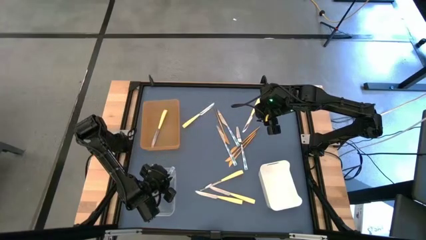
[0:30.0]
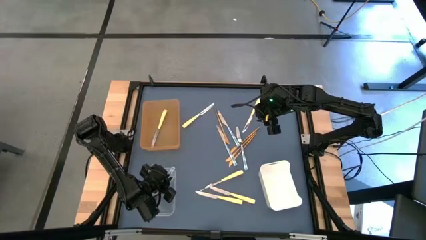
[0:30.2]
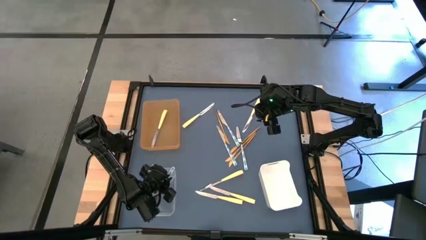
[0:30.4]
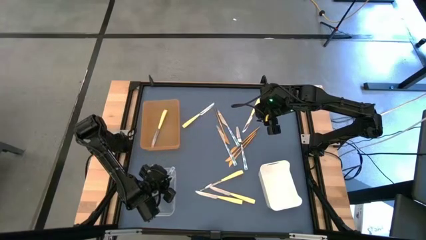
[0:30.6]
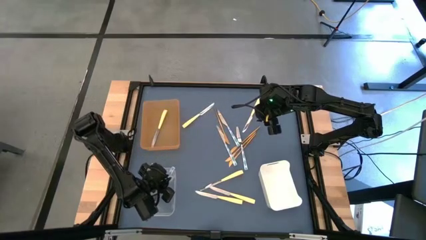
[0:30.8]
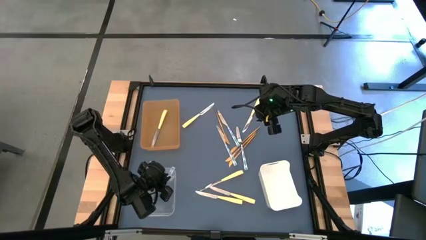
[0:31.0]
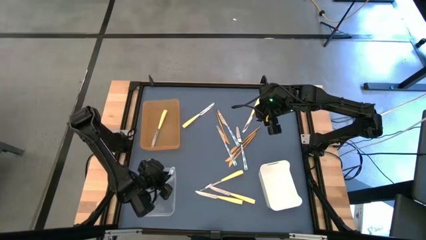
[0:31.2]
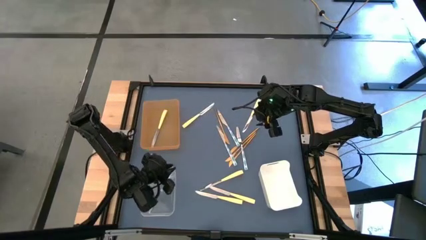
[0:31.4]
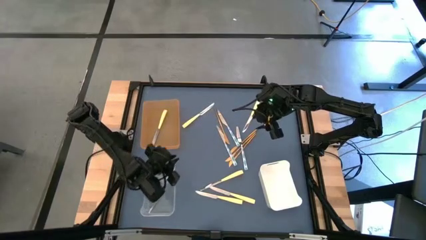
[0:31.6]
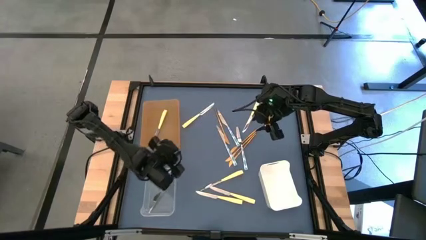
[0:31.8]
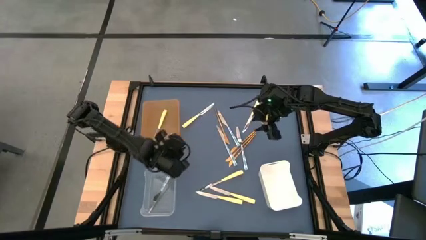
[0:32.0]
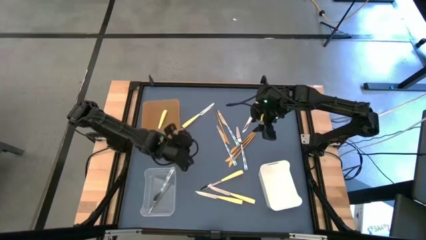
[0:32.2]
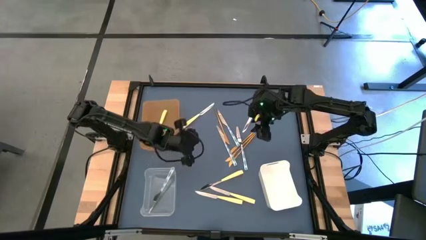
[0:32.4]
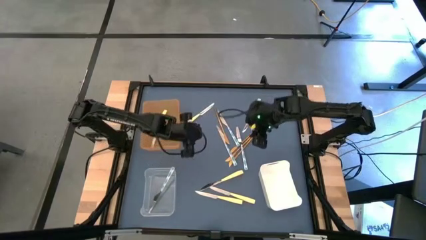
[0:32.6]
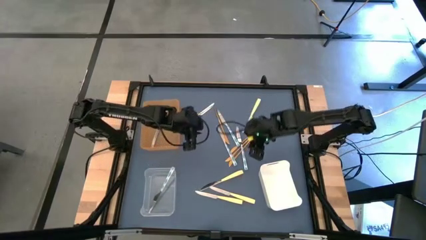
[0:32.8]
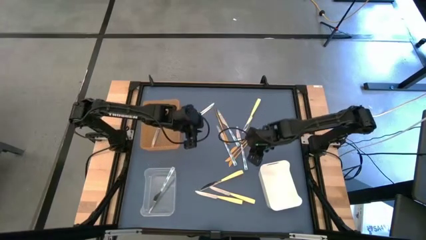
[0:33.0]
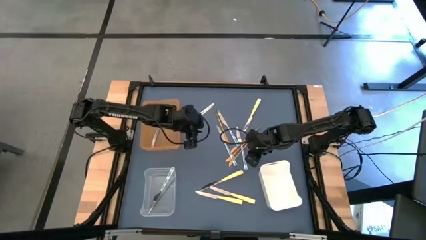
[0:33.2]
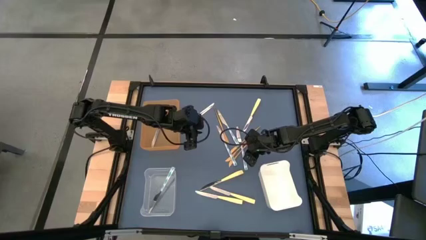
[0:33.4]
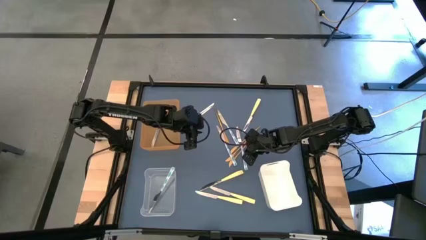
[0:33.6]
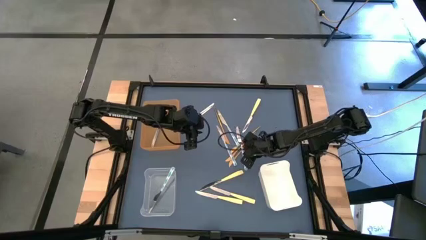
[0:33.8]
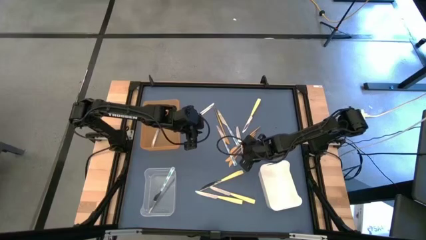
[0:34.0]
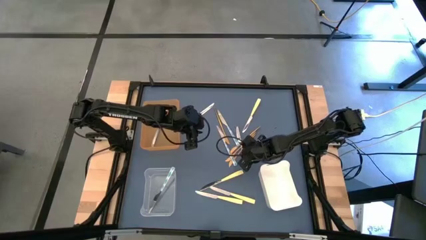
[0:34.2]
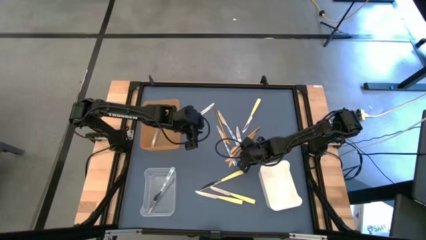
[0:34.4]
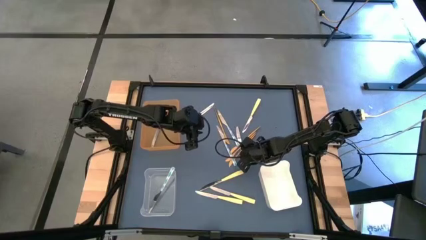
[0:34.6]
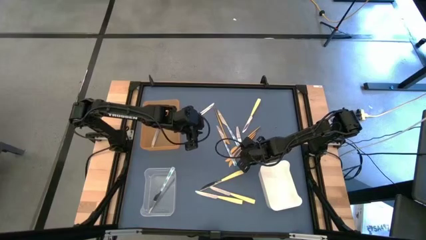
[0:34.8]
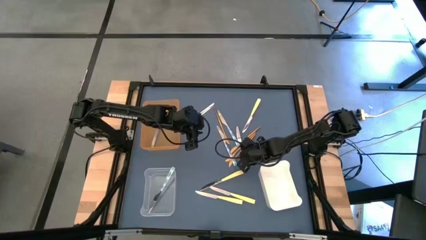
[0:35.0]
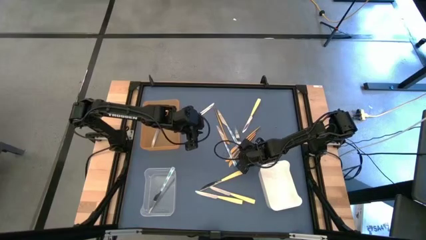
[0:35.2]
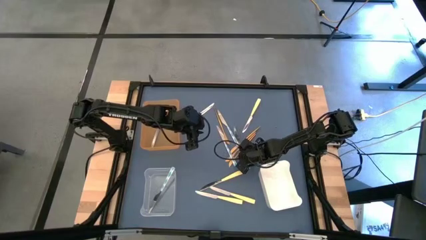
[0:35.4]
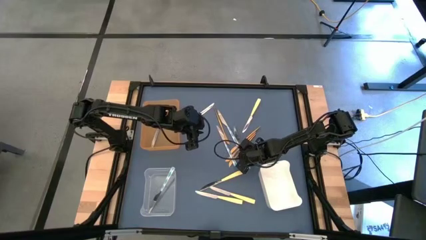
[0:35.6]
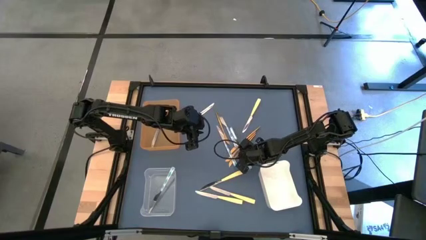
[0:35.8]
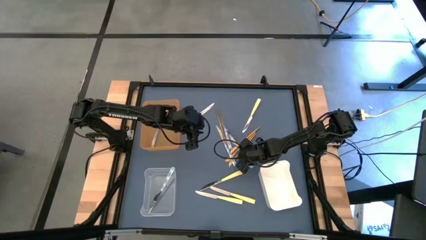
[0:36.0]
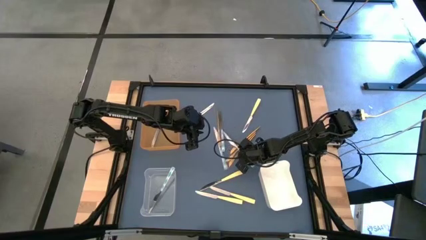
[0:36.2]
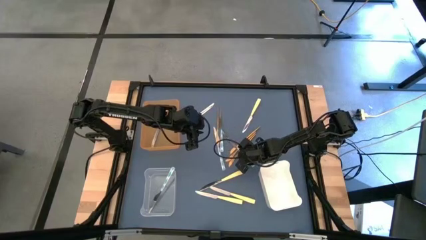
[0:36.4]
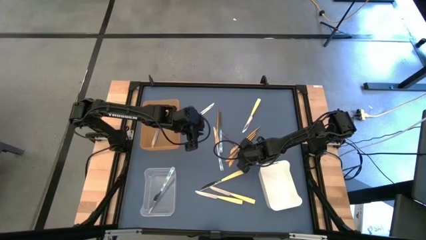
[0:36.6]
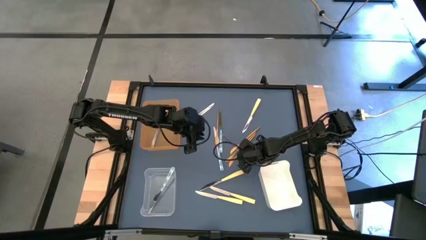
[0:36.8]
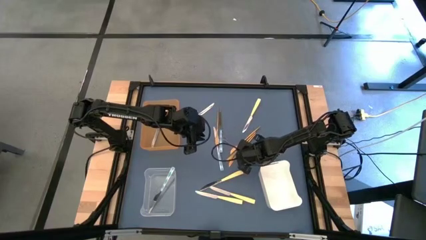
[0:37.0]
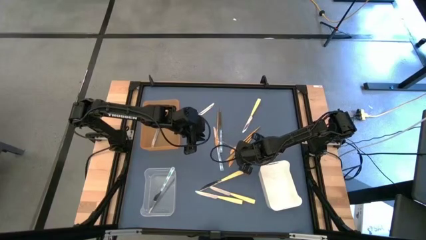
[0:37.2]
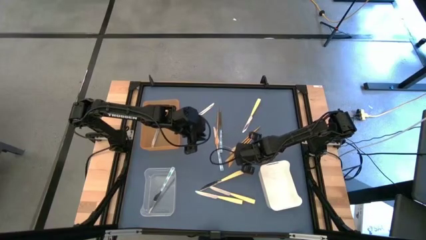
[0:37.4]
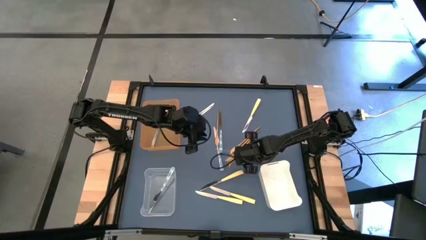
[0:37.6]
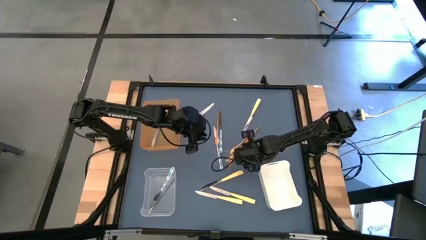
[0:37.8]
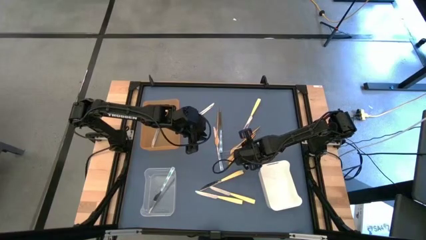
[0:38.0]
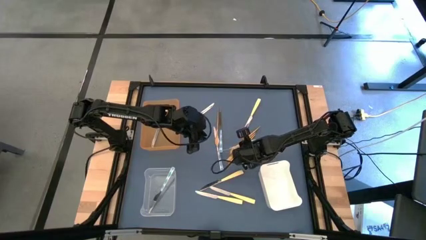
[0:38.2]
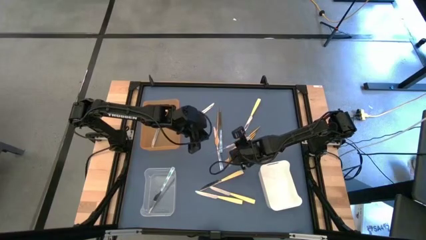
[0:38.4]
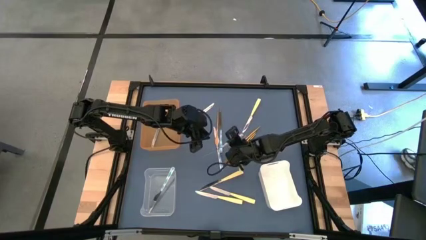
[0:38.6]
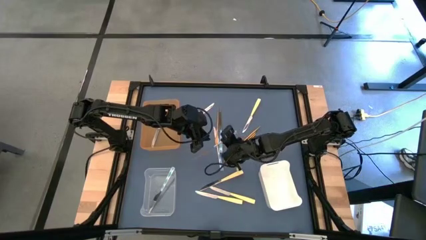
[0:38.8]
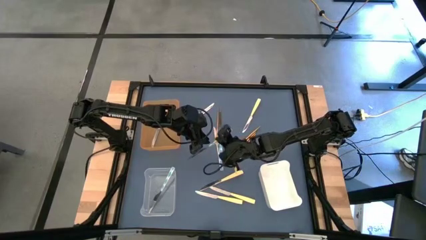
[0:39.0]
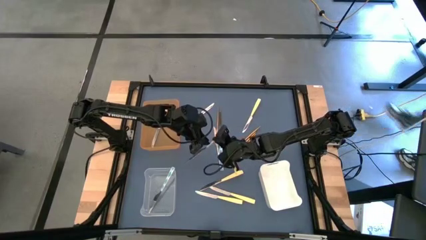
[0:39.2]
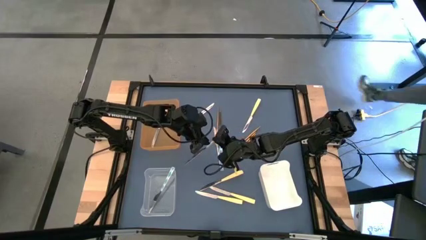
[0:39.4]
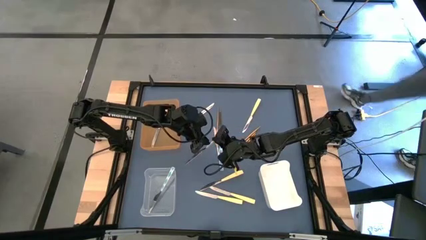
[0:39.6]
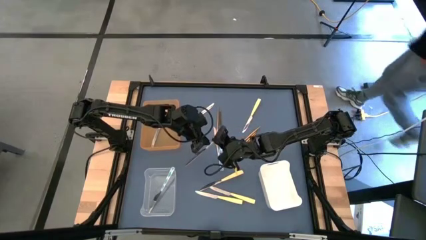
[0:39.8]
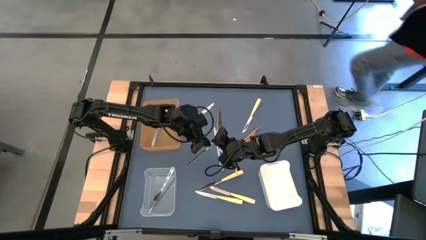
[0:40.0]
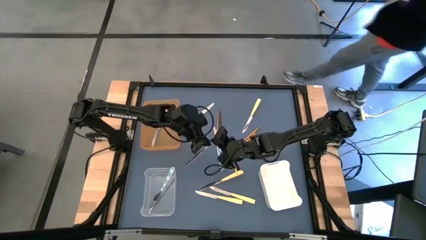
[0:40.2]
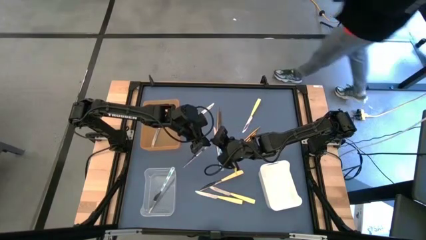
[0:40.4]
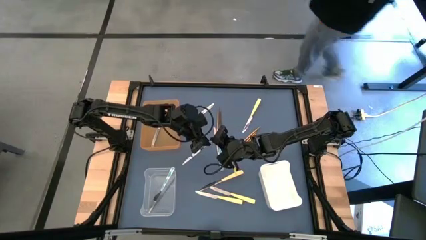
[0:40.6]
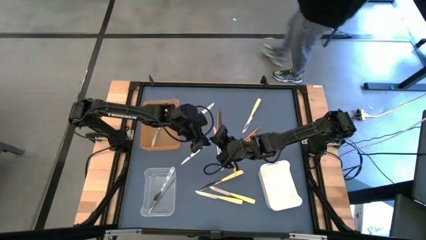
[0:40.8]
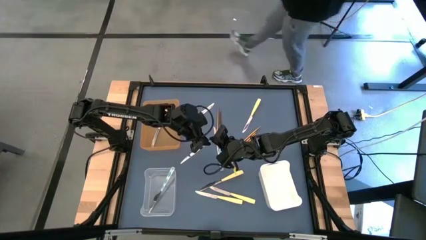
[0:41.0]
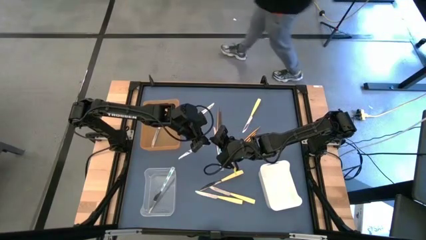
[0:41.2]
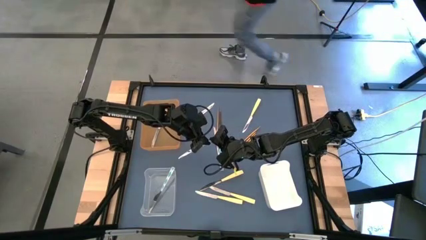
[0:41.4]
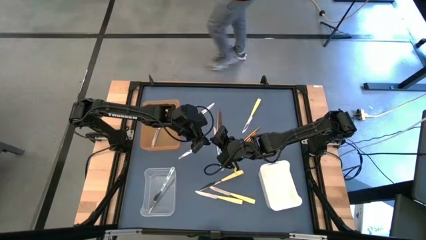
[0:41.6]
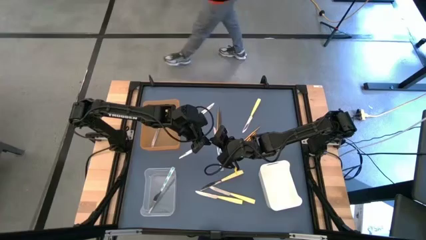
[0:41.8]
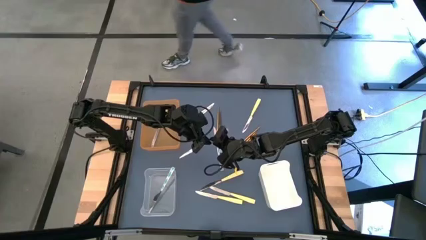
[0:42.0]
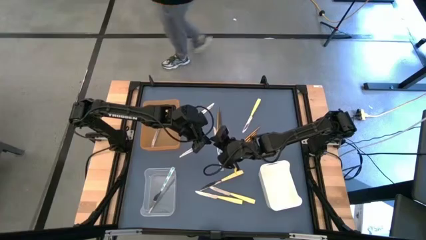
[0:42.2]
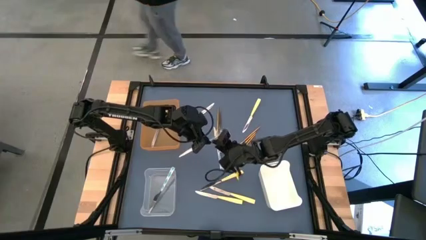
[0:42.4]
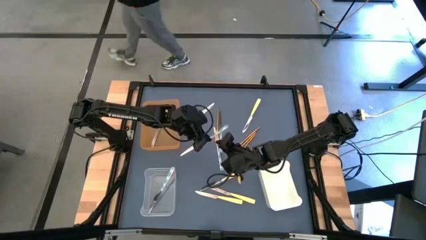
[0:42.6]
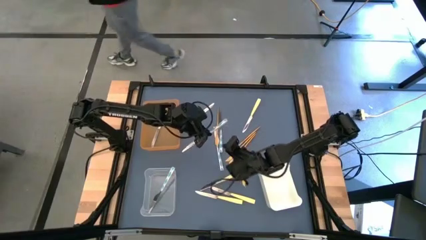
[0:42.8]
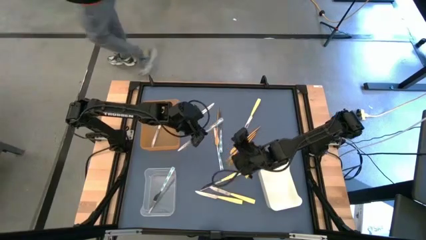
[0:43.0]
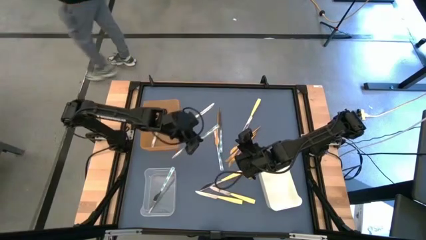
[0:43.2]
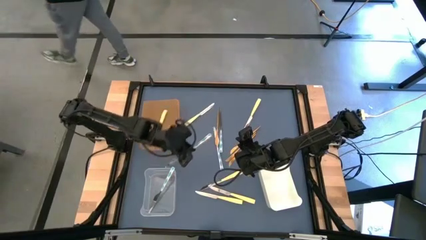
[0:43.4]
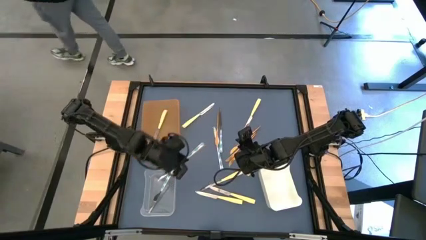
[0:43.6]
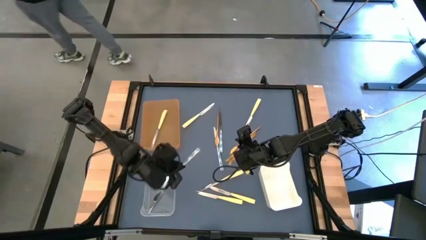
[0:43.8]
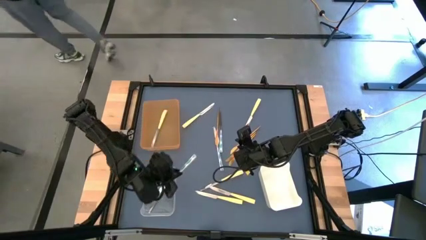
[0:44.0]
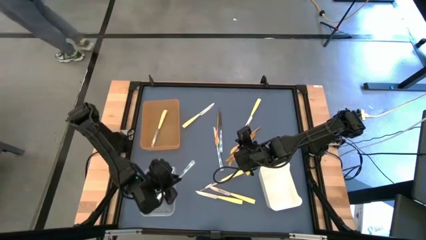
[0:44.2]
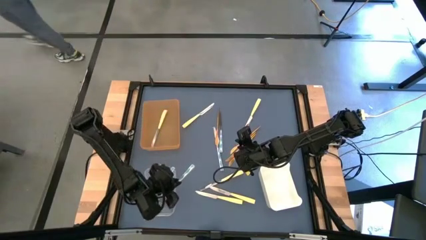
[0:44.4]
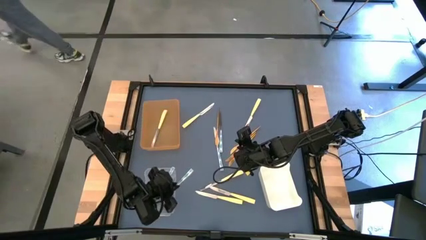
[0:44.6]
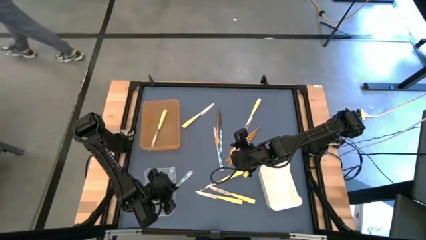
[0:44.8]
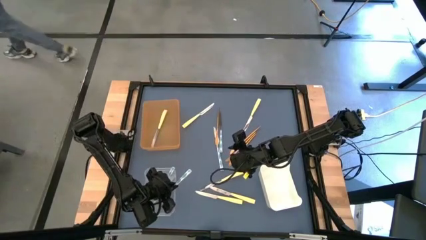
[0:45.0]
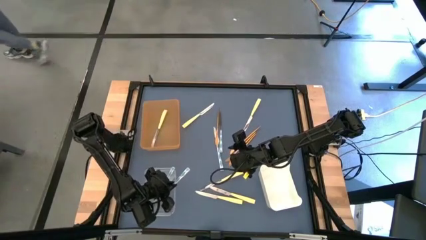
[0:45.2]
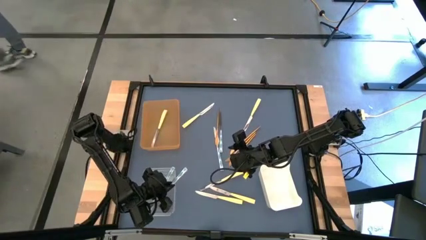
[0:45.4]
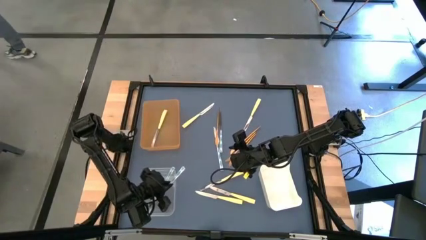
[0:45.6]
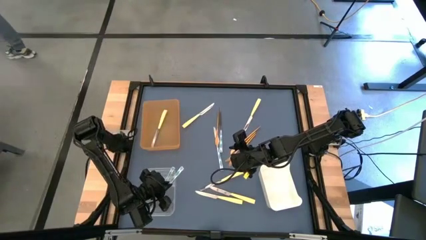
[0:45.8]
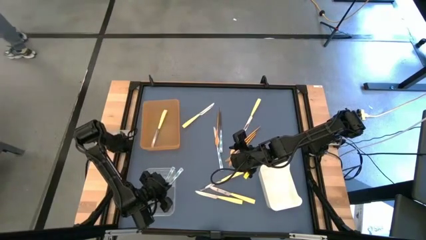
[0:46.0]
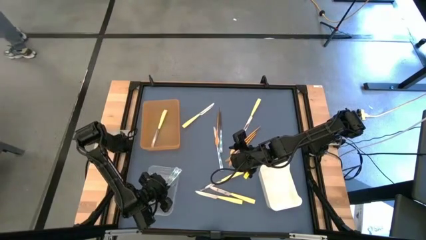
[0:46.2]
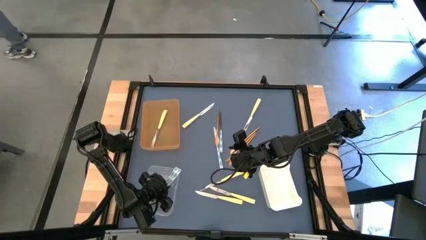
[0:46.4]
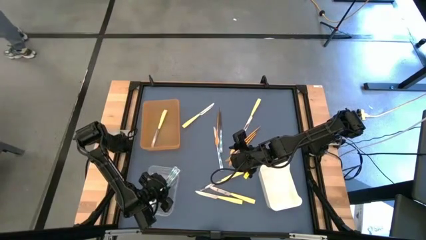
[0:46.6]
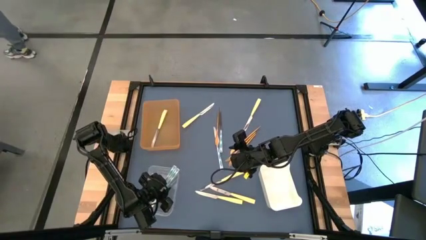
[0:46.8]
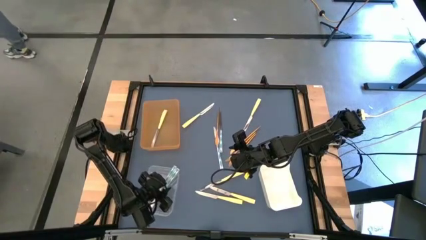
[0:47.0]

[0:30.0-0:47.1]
Task: Sort silverware by color (type)
Put the green knife into the transparent bin
